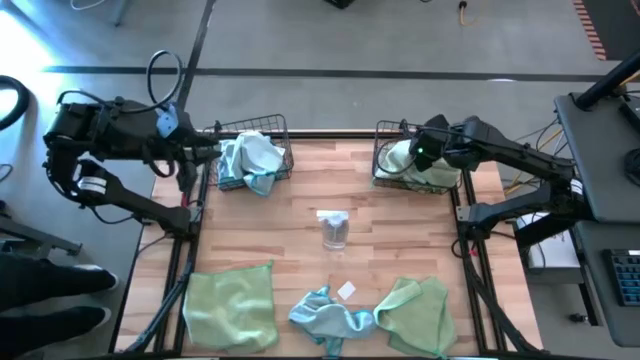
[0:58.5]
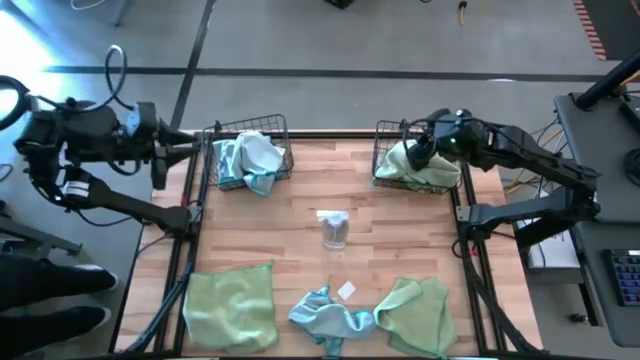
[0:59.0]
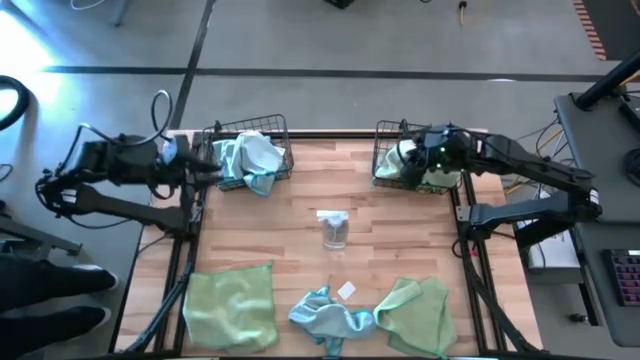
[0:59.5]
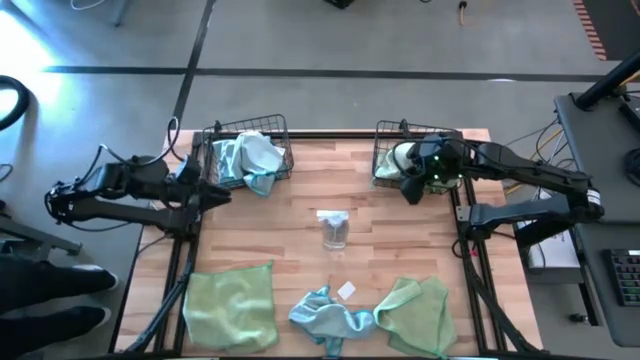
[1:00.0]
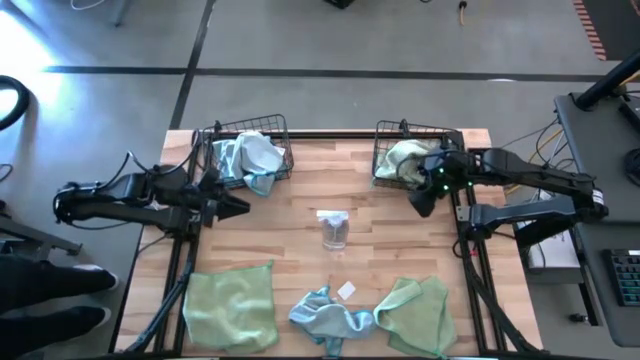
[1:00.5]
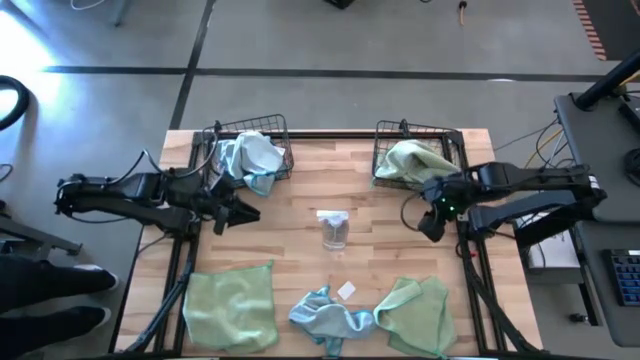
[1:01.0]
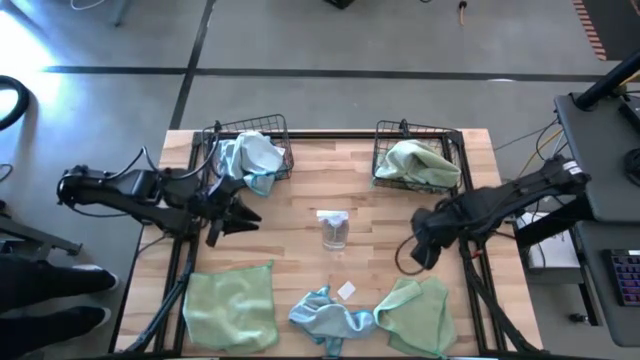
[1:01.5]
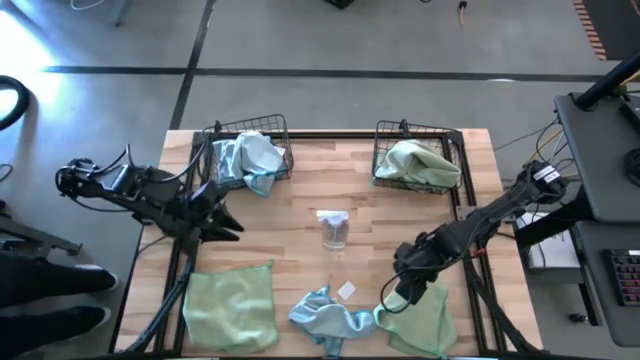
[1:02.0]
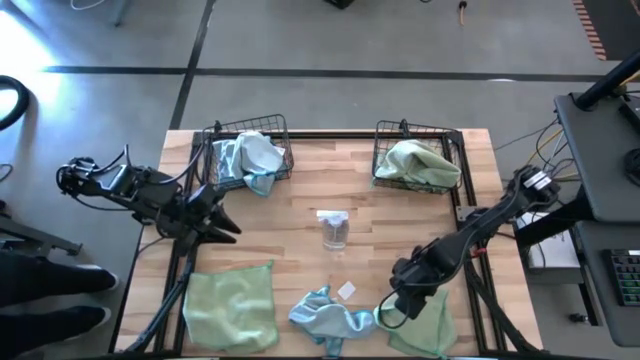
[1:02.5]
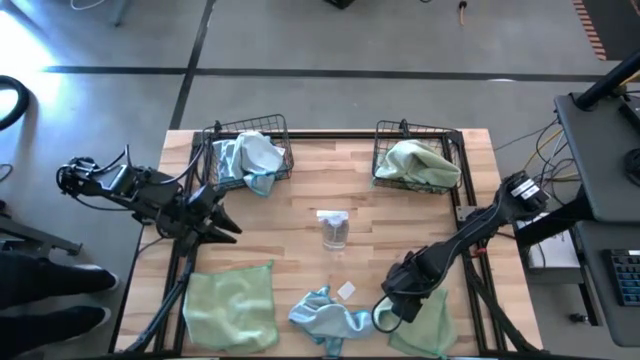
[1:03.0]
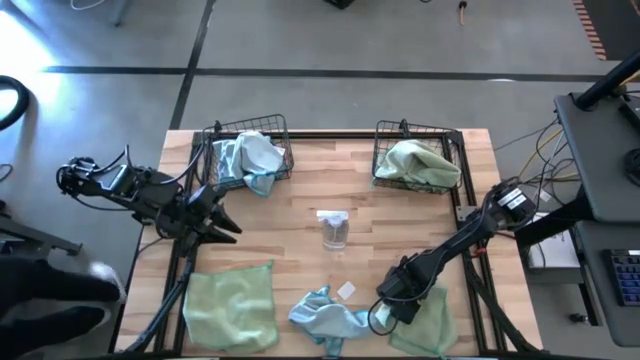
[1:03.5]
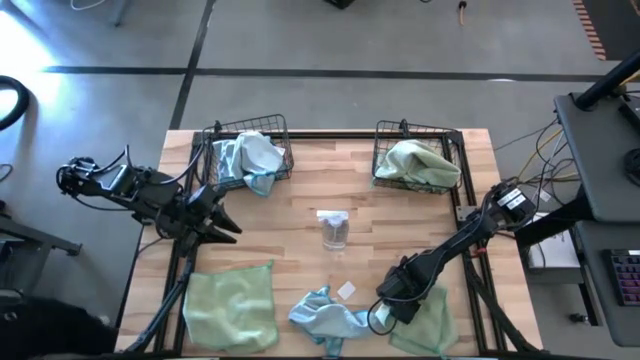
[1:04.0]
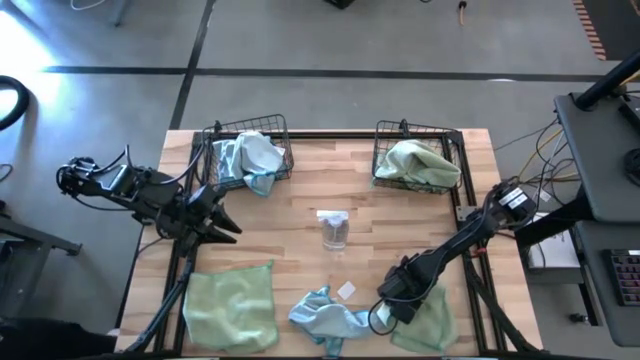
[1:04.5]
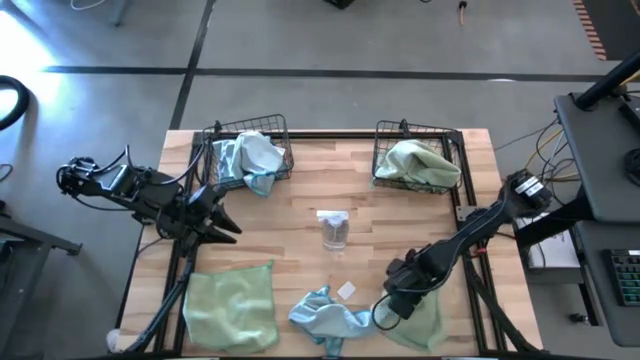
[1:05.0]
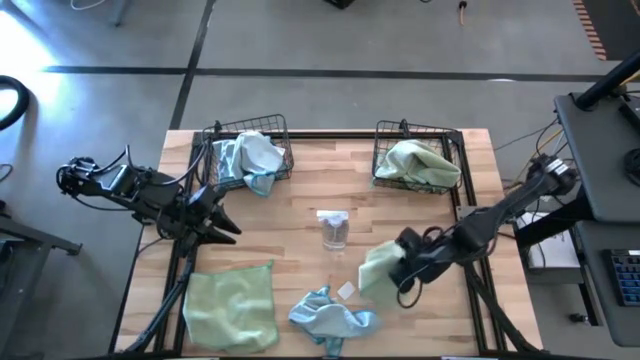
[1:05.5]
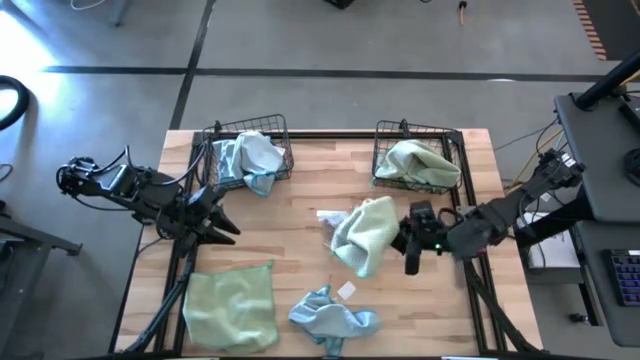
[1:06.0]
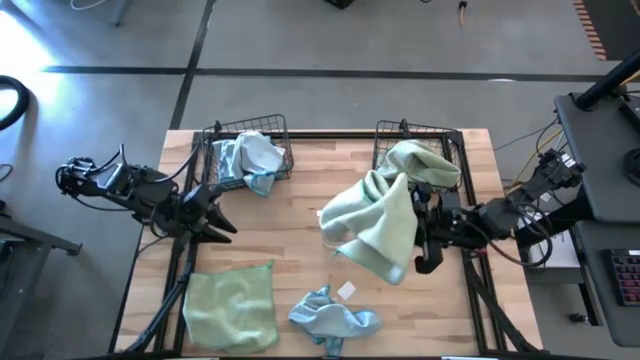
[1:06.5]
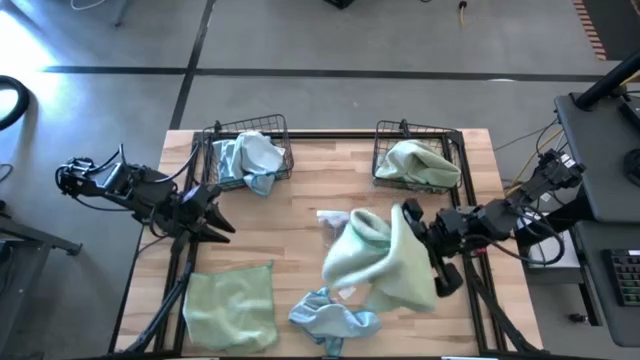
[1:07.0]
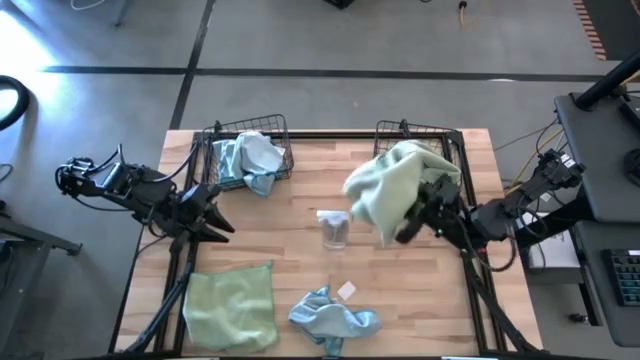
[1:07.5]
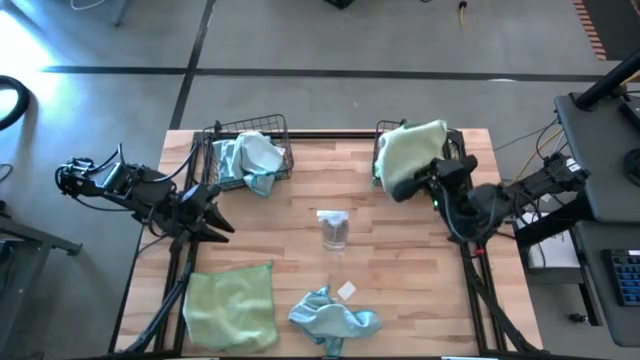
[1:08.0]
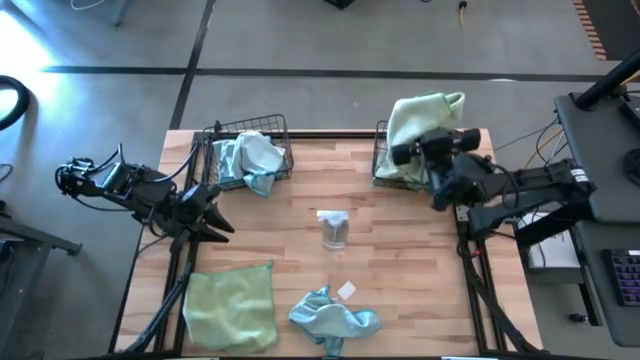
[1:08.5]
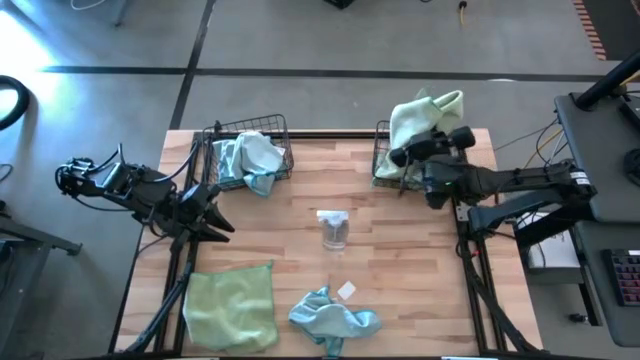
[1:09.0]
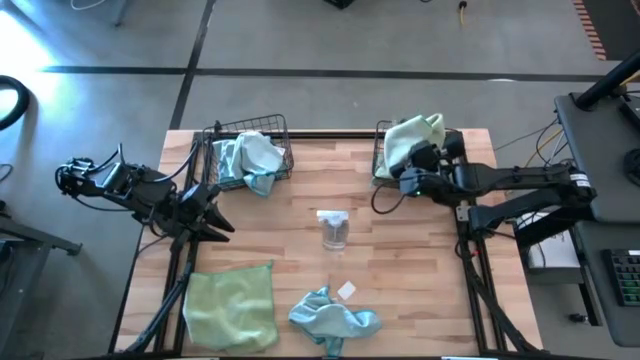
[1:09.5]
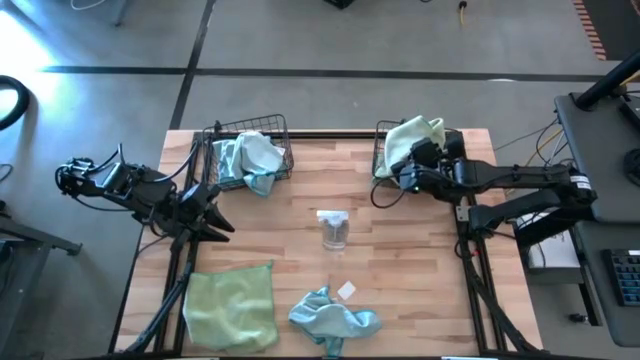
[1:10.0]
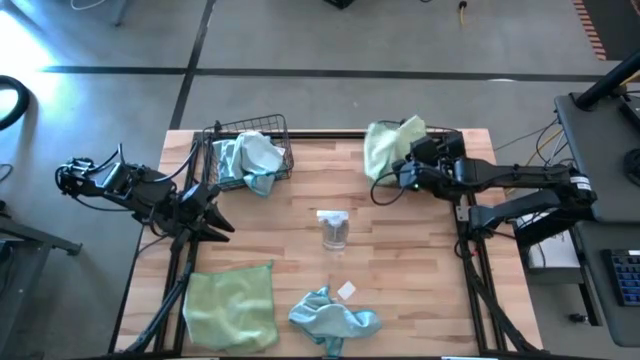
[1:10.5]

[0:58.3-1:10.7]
Task: Sort microfiber towel by color & place in baskets
Put the green towel into the right wire basket

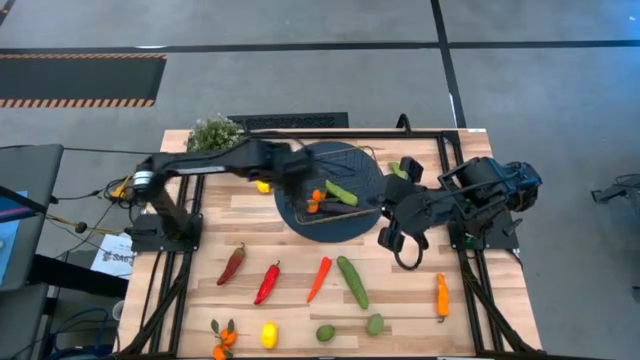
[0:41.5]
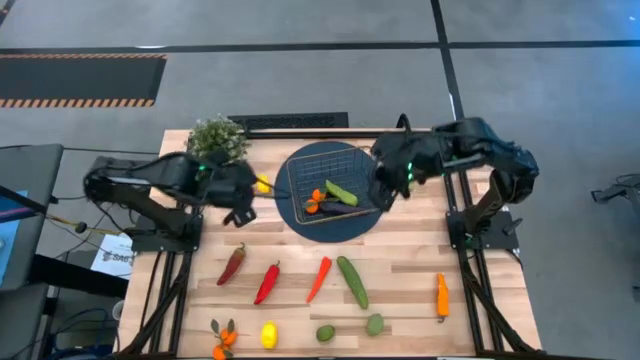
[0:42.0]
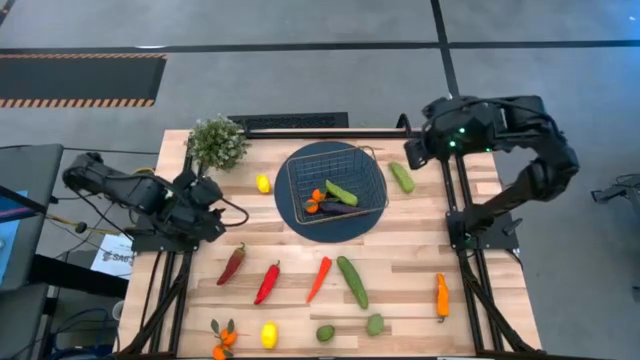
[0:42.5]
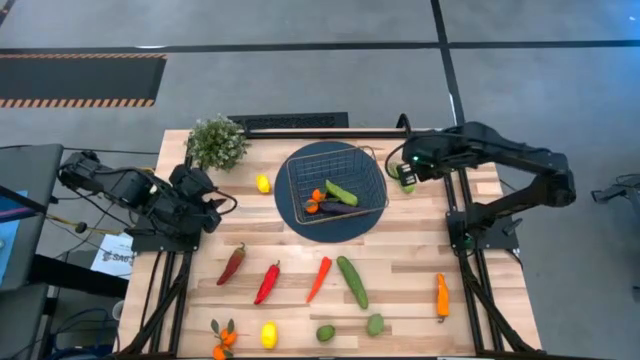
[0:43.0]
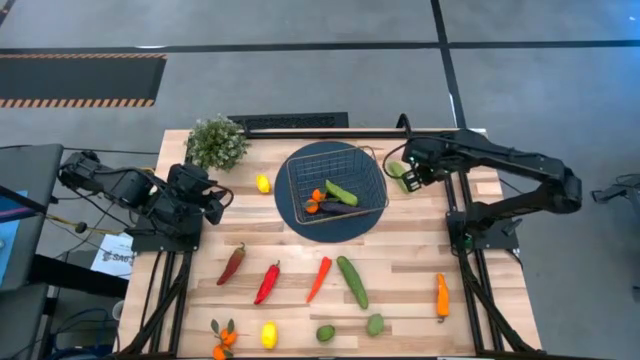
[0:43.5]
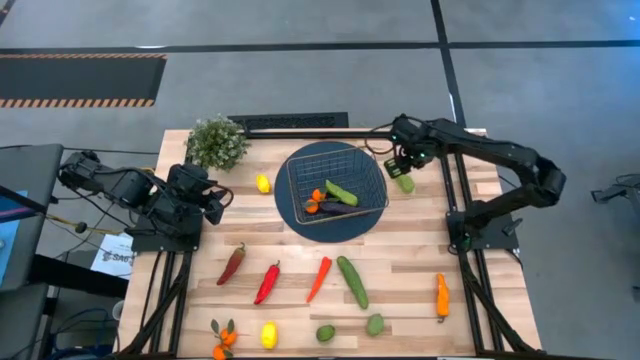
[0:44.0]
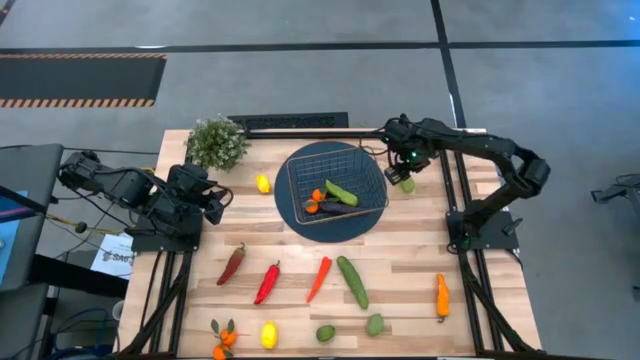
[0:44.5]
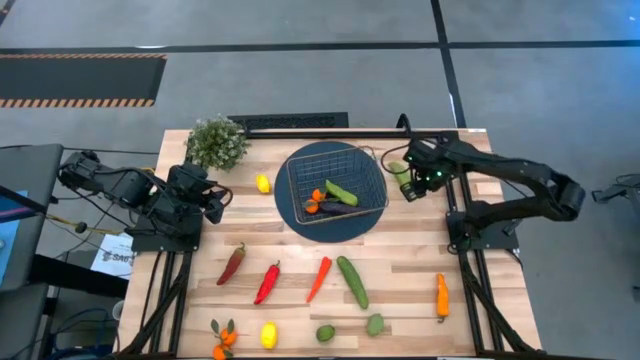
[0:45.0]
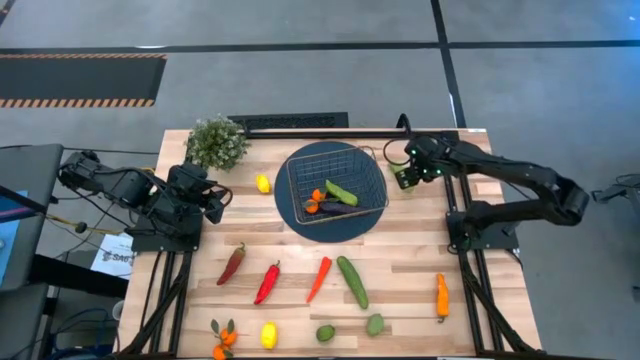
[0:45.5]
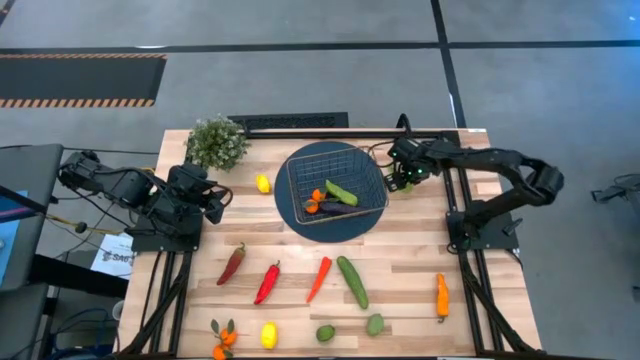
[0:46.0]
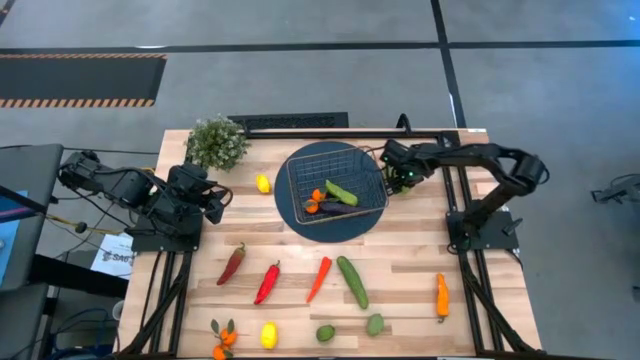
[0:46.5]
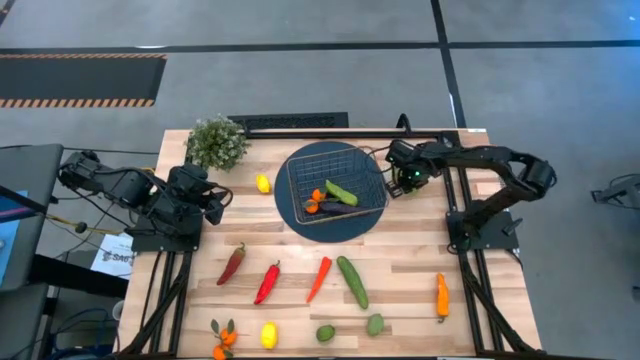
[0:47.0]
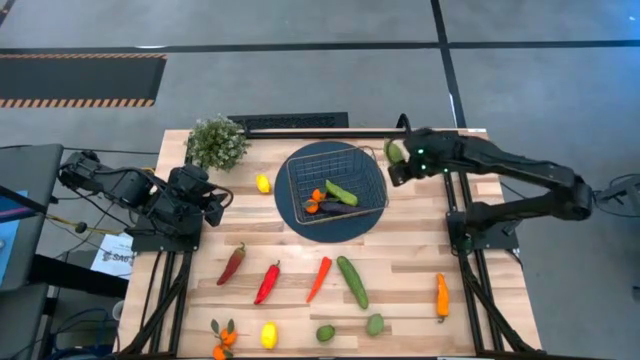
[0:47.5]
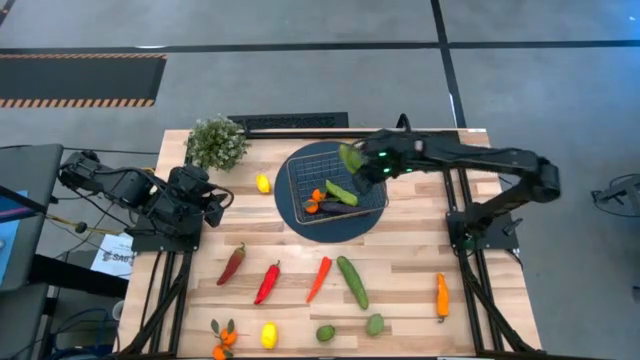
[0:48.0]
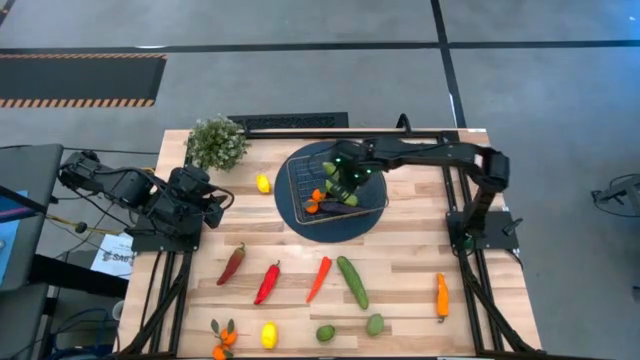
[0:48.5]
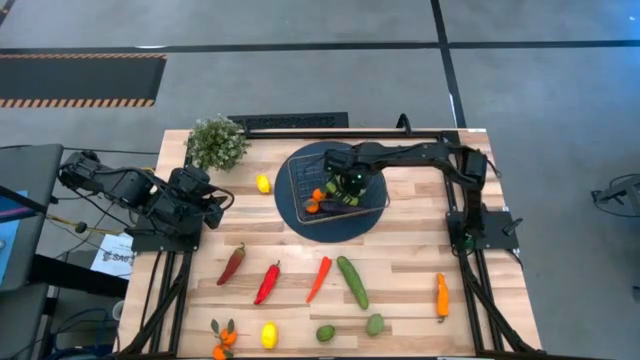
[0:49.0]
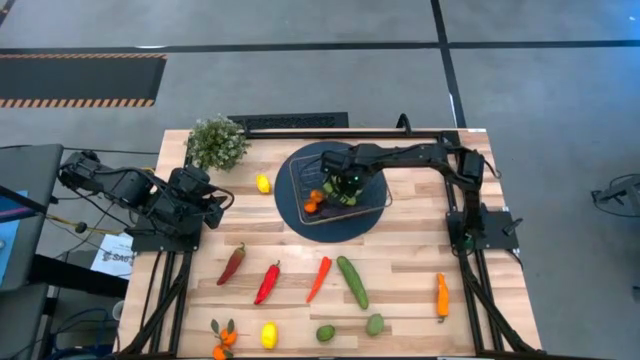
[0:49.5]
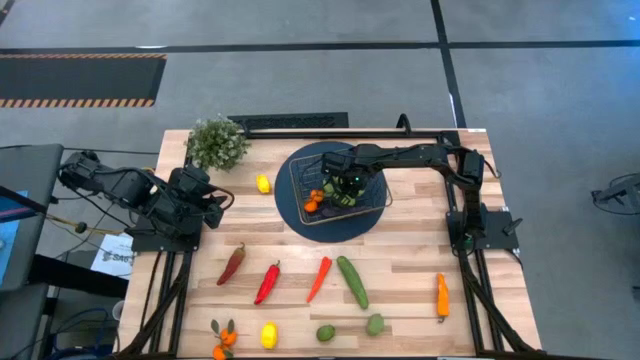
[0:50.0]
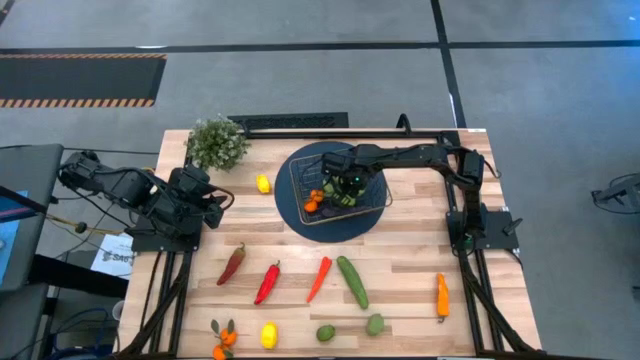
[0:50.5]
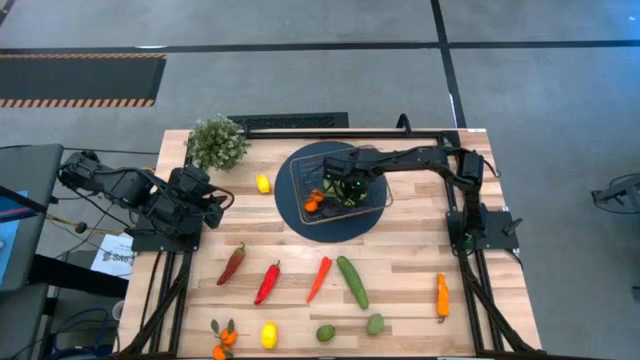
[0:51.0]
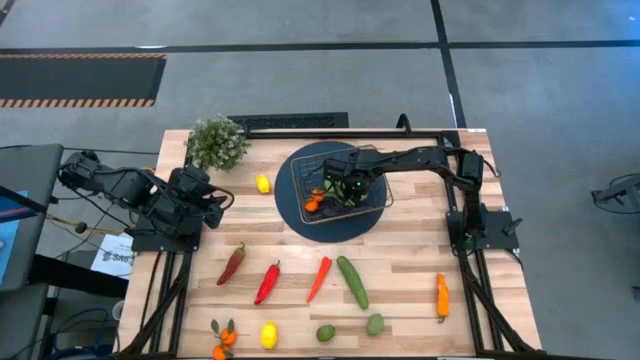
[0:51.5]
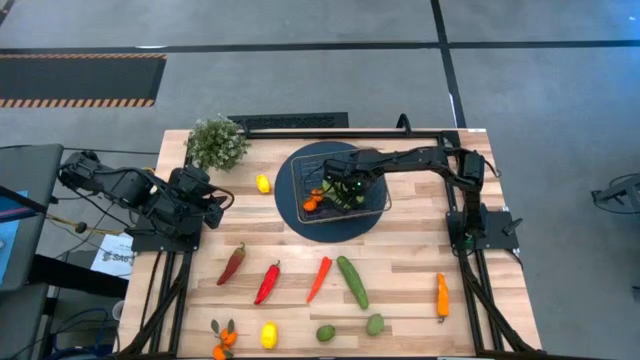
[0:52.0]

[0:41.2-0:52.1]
Task: Build produce basket
Put the top cucumber into the basket
